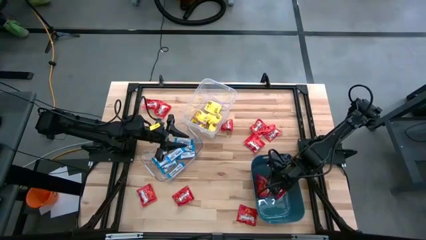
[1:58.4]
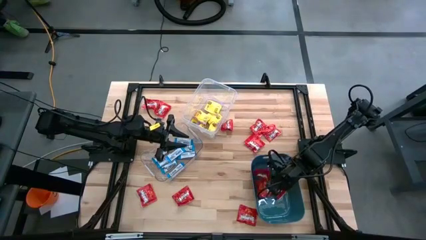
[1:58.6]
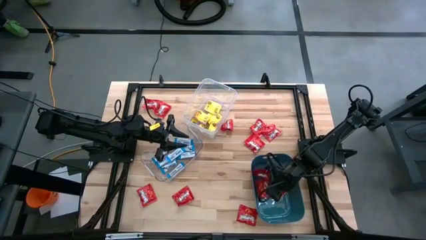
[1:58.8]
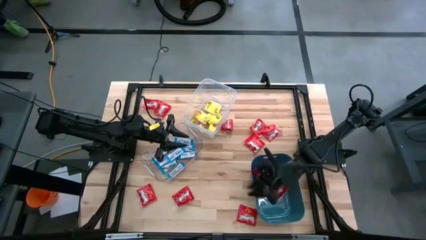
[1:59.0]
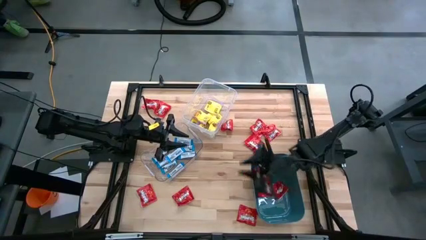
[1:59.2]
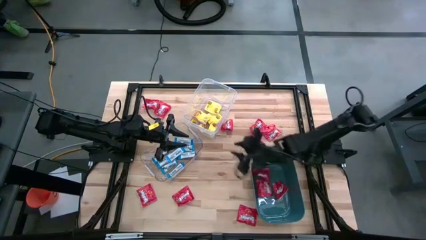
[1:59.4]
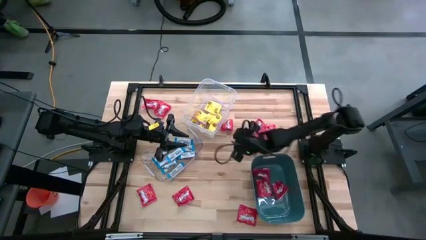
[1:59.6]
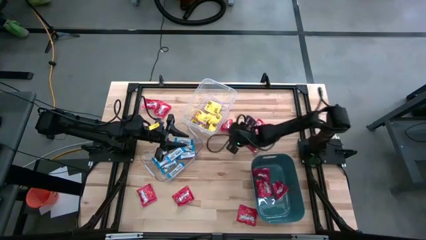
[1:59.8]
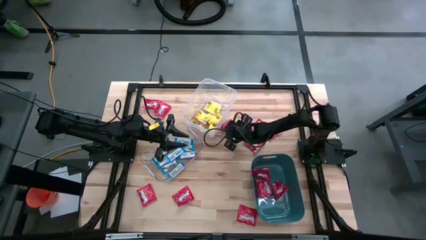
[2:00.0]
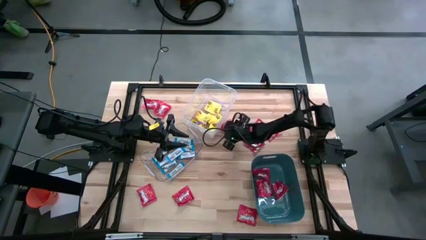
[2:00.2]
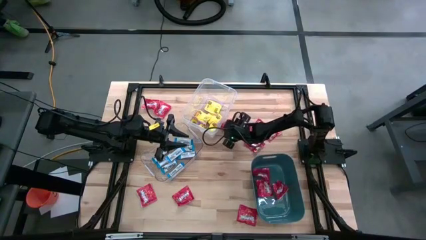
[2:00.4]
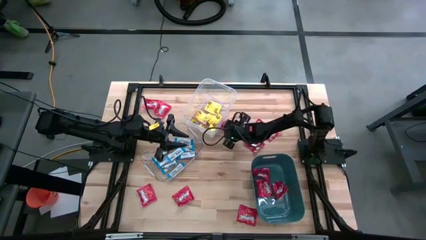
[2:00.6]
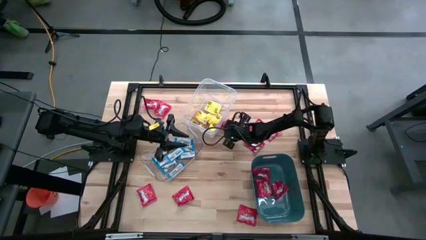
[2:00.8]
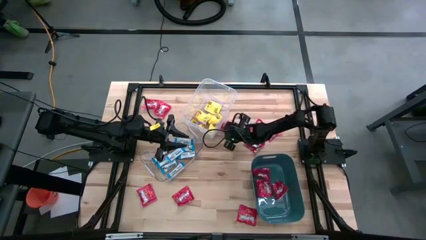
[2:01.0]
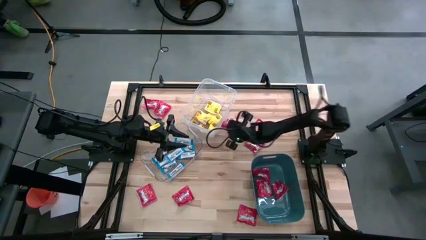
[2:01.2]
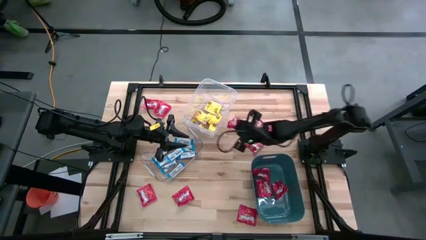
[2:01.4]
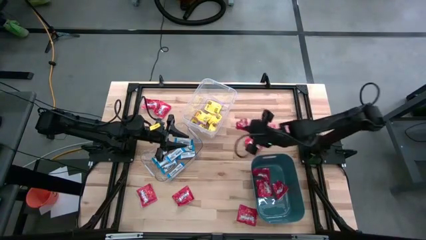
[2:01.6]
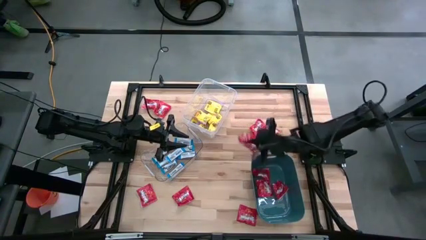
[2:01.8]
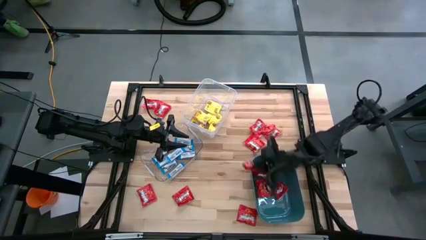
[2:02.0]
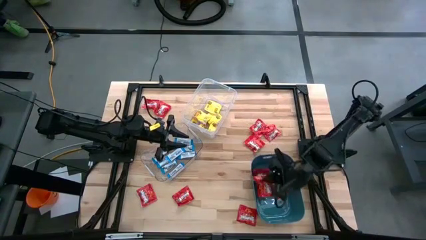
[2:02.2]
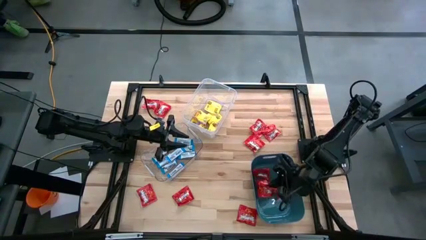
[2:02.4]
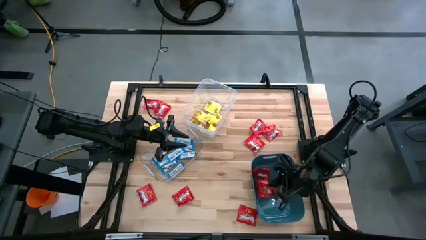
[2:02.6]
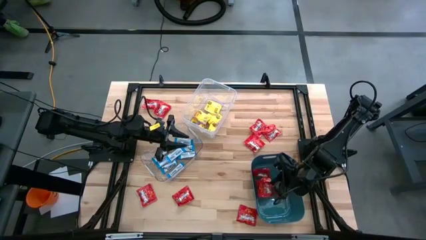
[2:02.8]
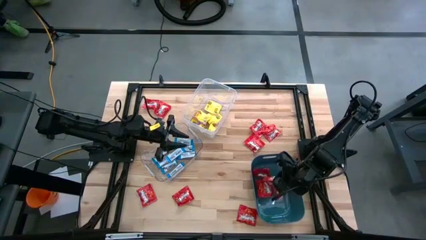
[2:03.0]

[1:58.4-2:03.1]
Task: Sort candy
Put the red candy into the blue bin

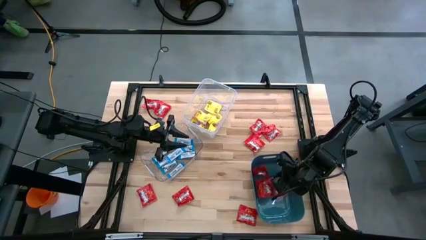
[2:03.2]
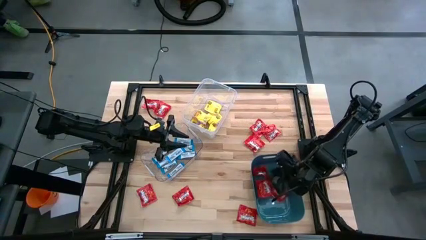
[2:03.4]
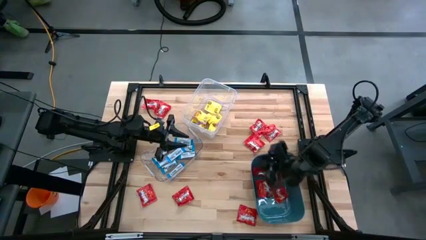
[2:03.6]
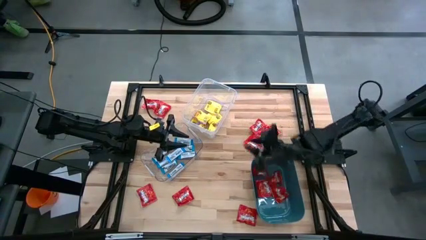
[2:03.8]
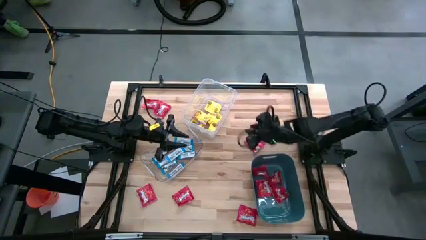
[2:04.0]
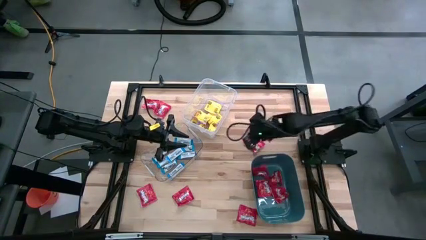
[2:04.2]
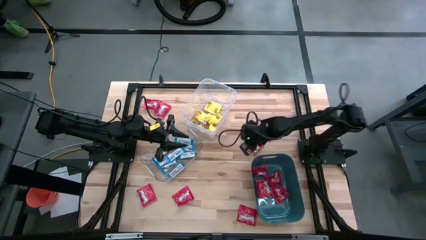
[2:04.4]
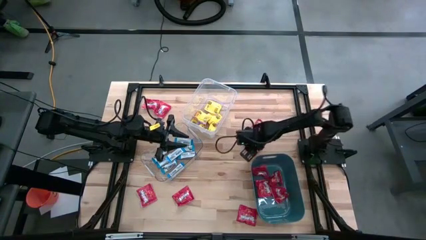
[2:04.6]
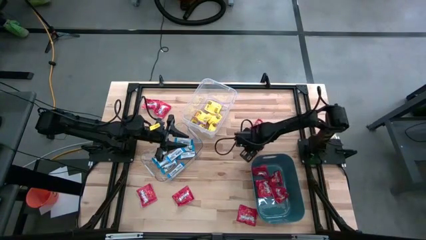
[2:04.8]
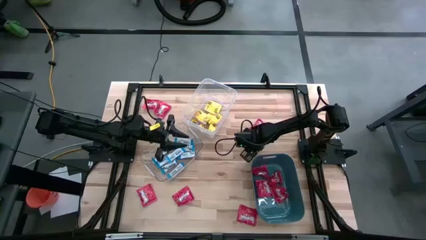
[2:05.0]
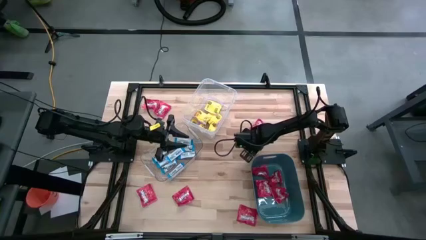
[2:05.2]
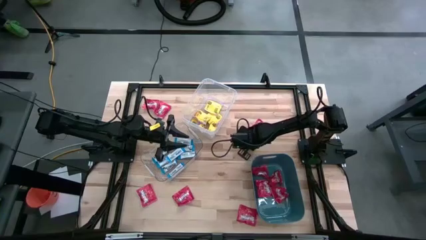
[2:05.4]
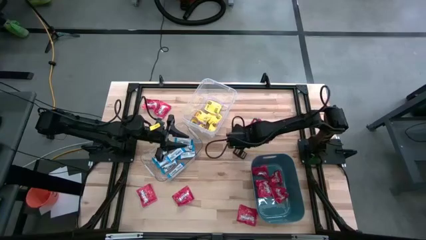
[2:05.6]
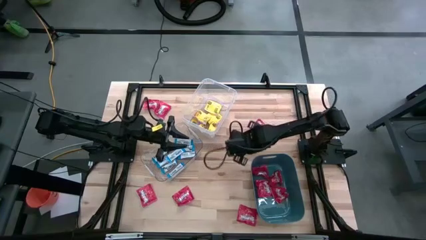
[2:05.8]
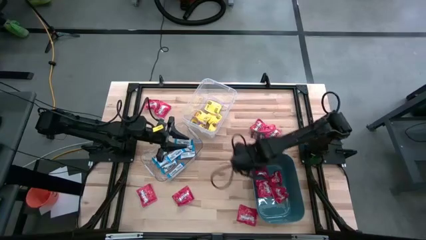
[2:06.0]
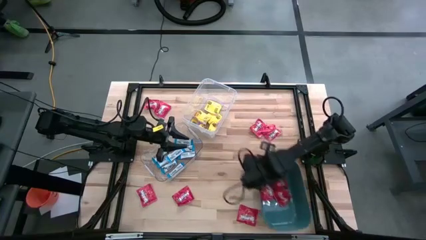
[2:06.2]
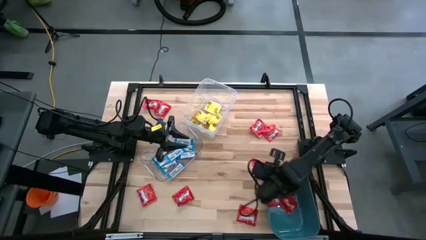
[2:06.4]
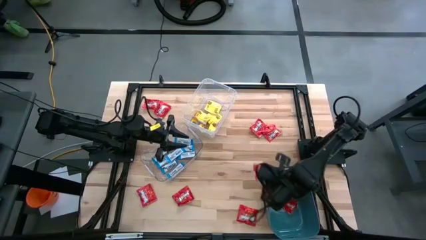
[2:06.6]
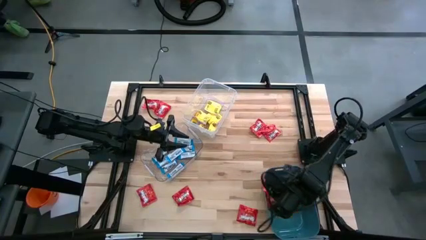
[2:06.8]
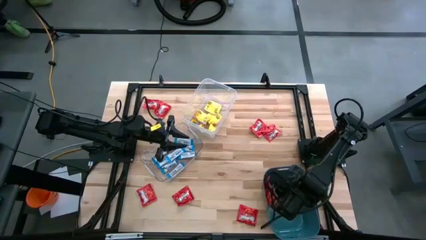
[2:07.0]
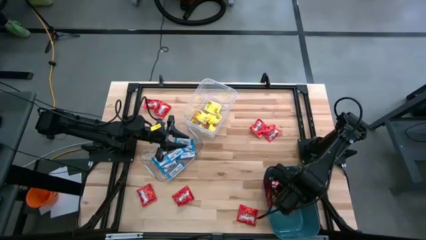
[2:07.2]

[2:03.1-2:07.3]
Put the red candy into the blue bin

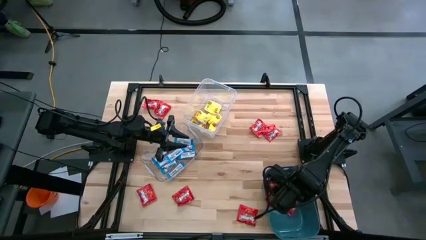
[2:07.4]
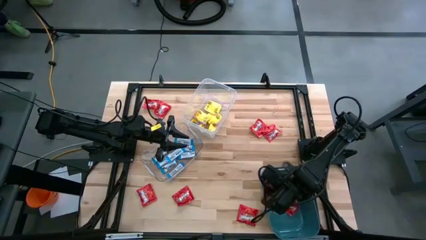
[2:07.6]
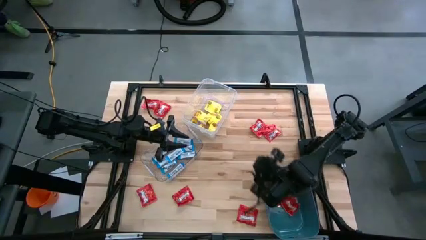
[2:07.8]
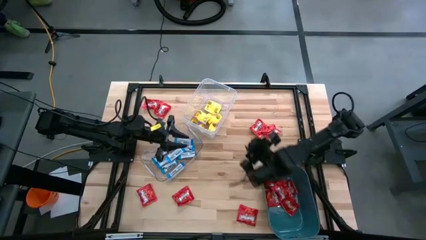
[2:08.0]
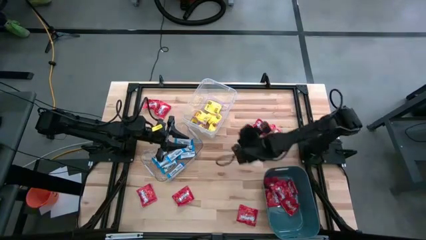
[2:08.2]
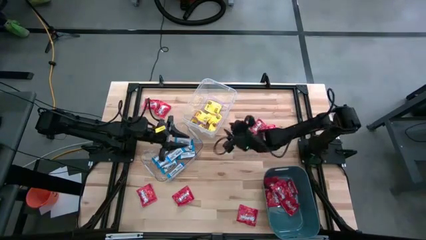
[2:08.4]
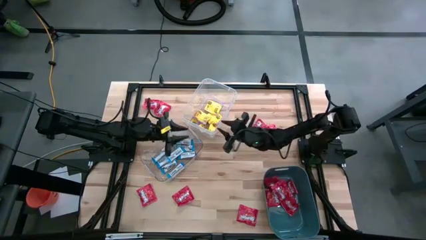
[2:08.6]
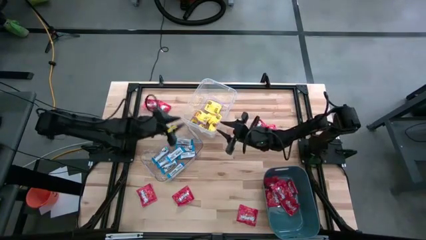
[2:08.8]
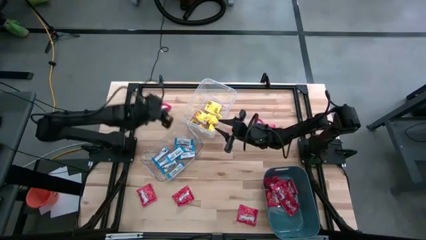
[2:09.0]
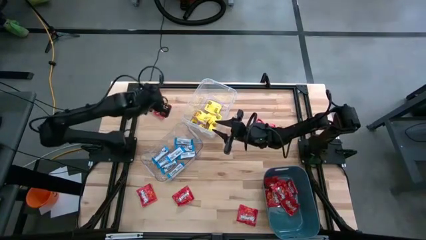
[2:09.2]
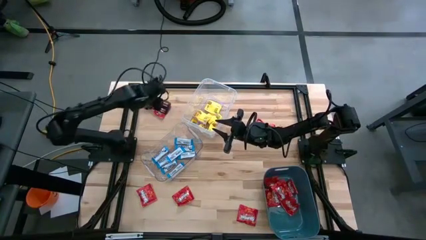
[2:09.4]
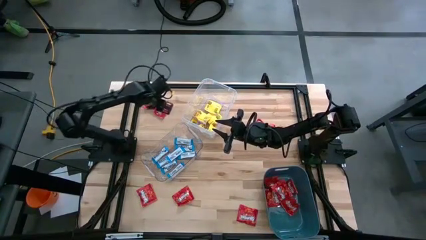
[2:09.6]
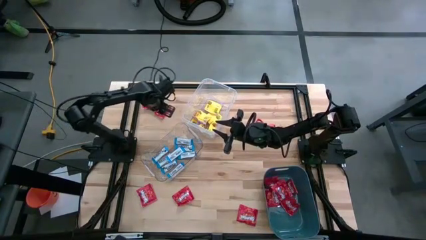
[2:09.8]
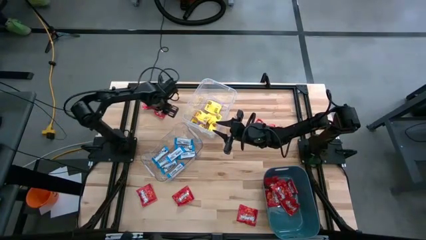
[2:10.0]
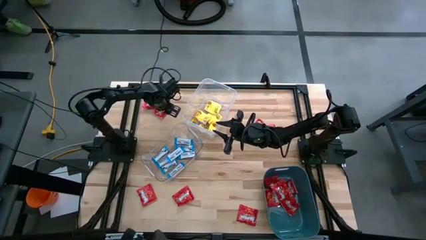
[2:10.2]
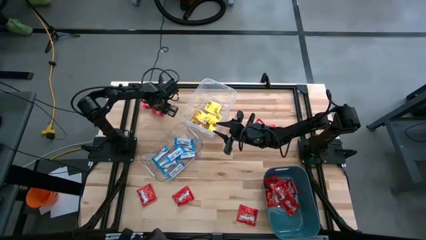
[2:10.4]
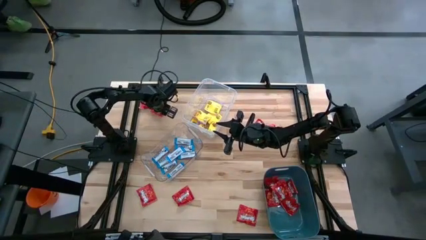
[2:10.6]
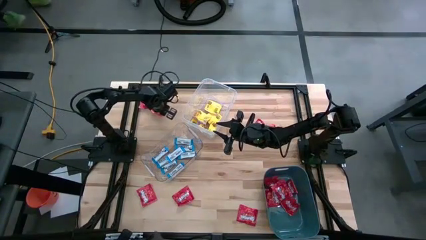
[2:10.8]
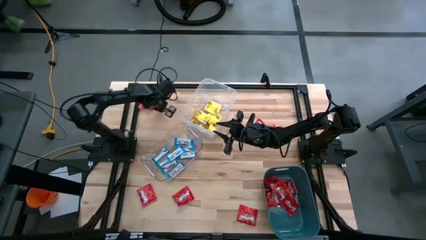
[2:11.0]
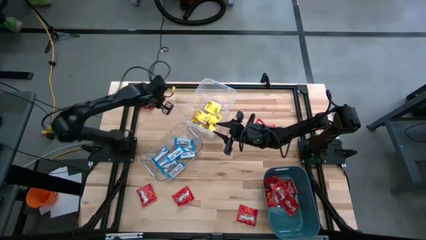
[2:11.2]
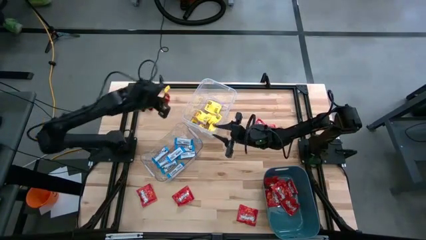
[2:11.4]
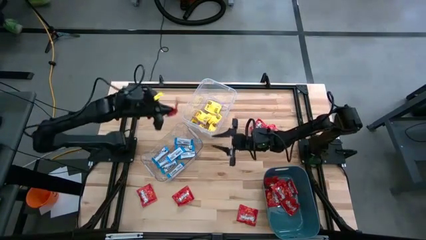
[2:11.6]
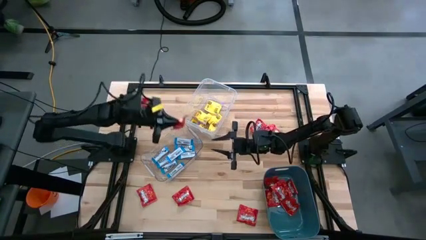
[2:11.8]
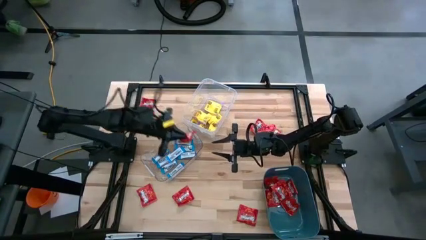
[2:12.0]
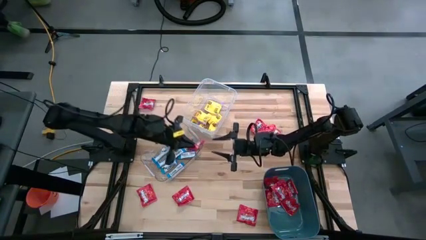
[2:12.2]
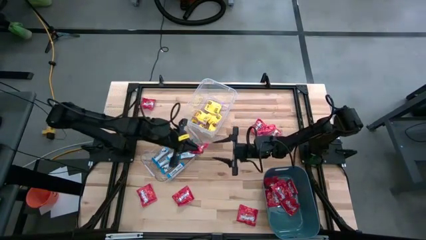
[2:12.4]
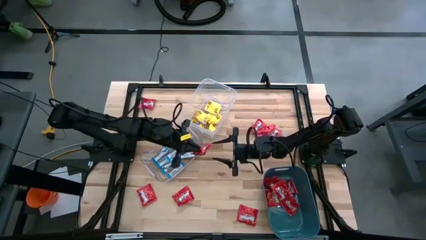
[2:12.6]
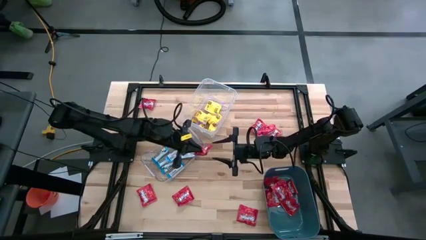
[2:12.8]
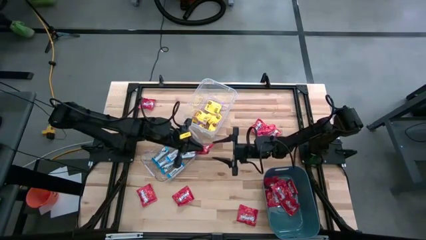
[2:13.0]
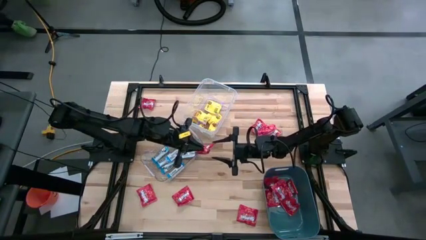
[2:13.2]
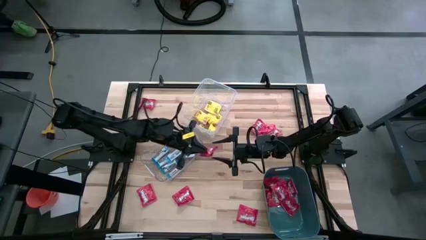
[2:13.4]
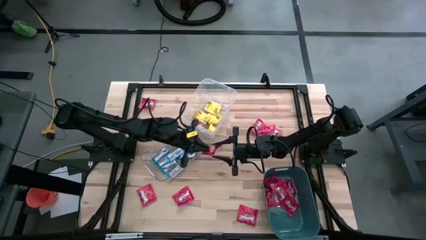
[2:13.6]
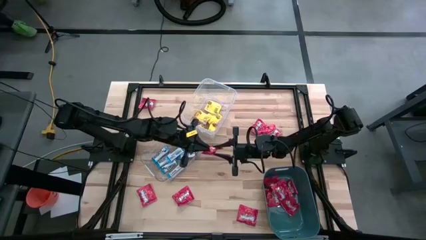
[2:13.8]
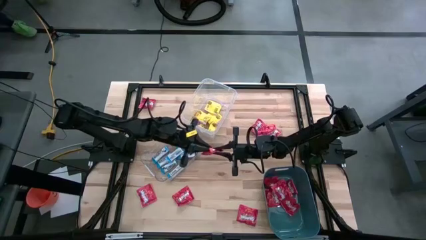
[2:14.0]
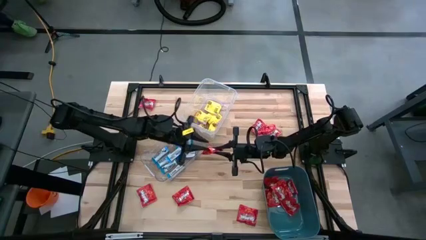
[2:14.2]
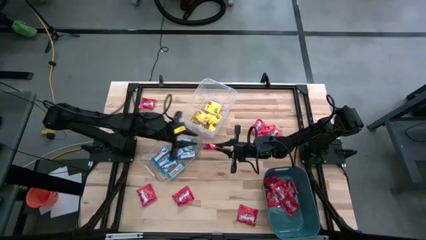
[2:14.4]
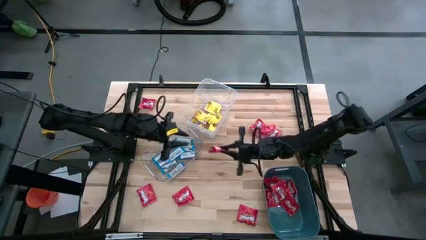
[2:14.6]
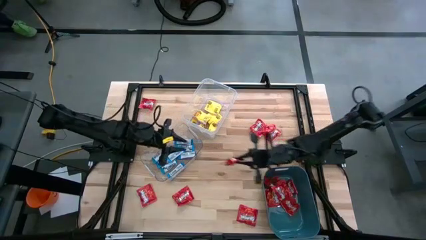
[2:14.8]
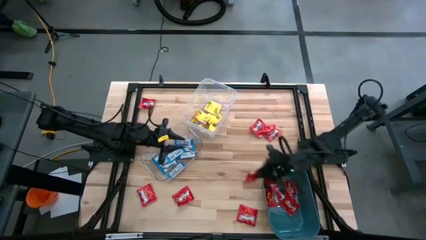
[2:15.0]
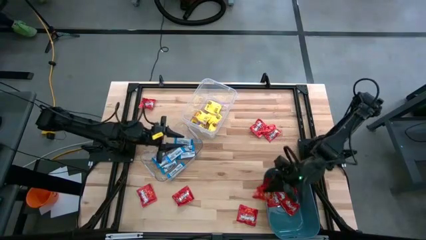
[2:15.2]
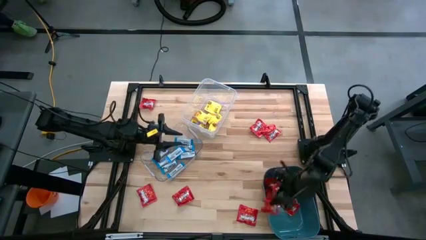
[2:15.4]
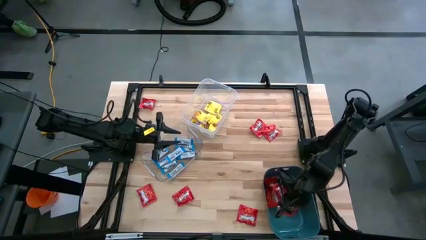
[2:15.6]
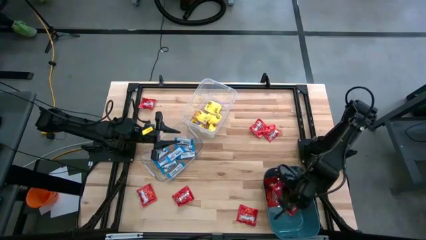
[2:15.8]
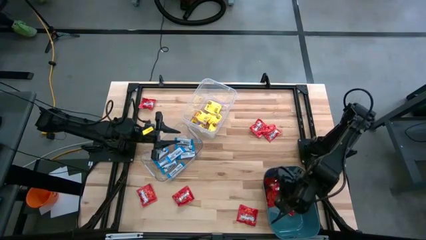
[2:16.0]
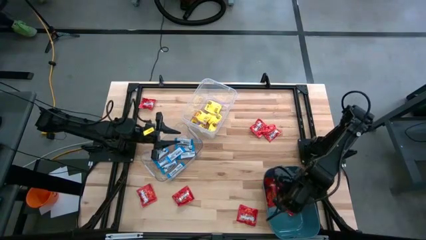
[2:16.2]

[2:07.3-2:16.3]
Put the red candy into the blue bin
